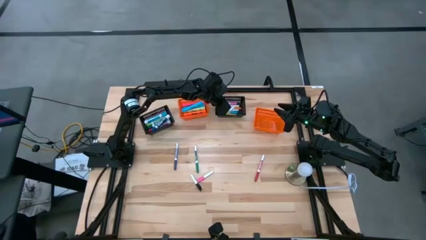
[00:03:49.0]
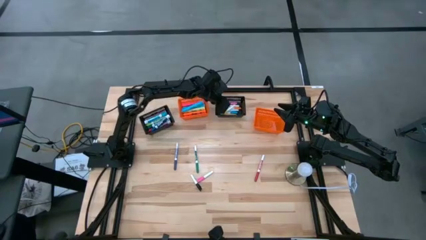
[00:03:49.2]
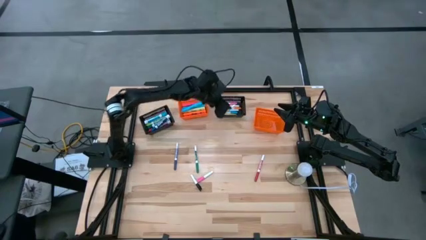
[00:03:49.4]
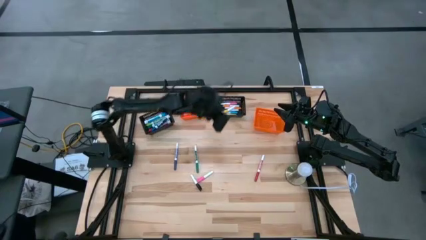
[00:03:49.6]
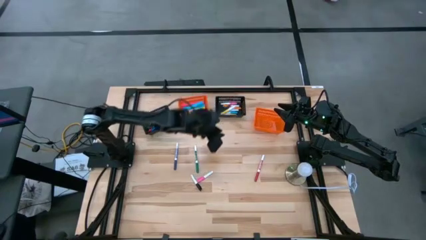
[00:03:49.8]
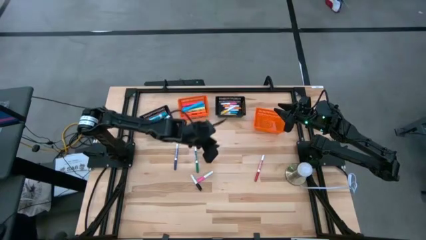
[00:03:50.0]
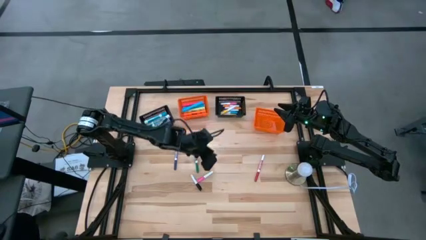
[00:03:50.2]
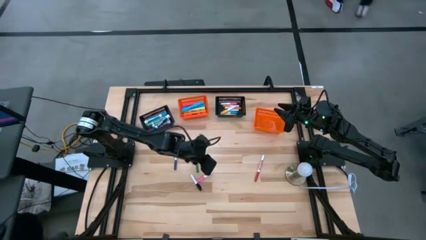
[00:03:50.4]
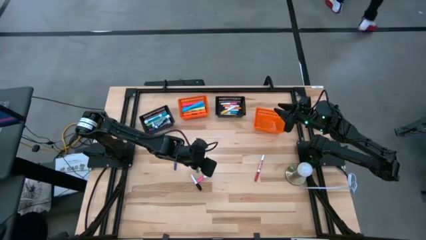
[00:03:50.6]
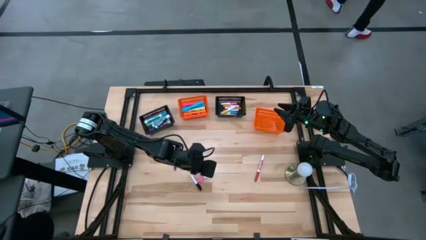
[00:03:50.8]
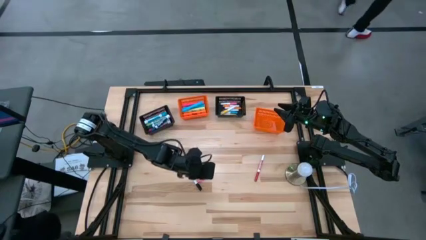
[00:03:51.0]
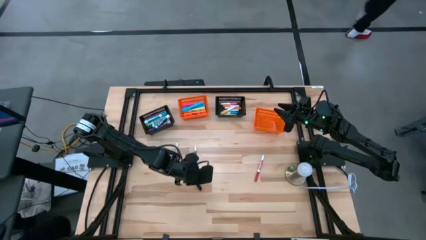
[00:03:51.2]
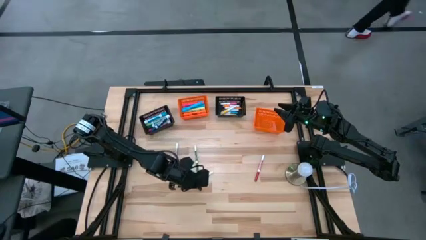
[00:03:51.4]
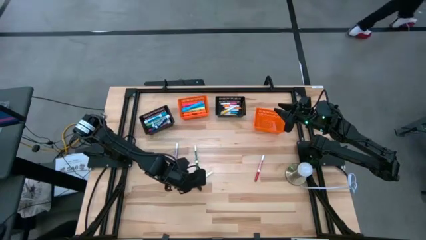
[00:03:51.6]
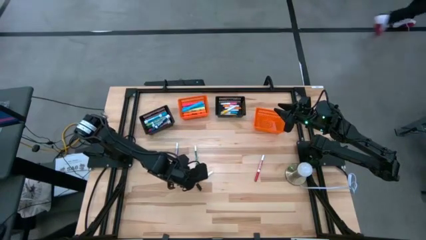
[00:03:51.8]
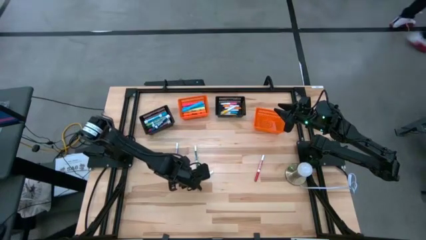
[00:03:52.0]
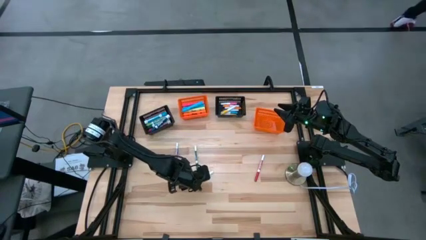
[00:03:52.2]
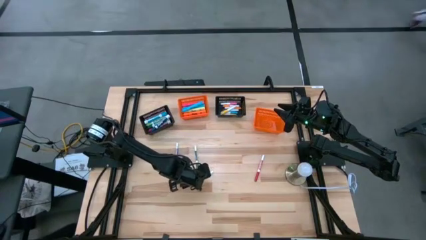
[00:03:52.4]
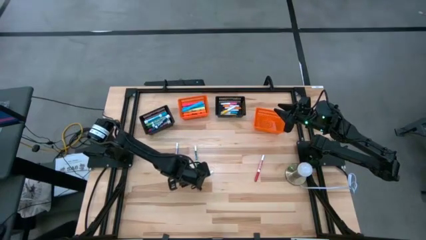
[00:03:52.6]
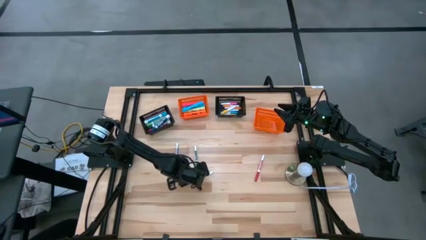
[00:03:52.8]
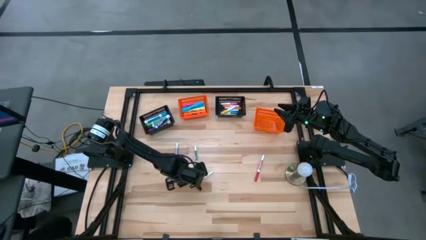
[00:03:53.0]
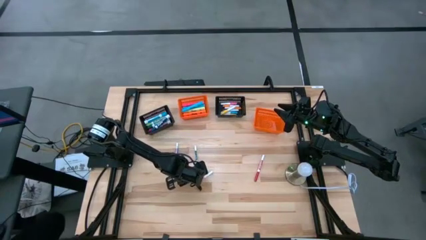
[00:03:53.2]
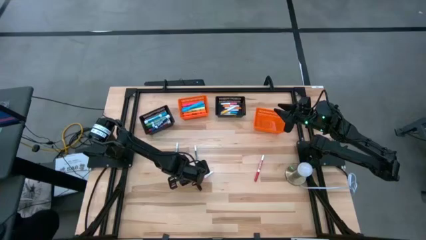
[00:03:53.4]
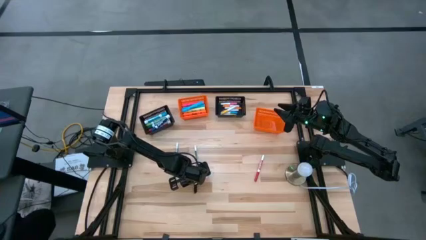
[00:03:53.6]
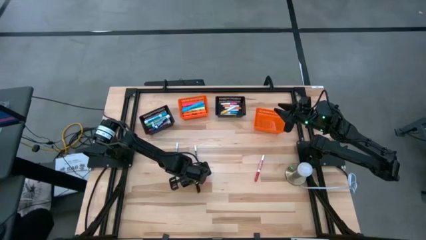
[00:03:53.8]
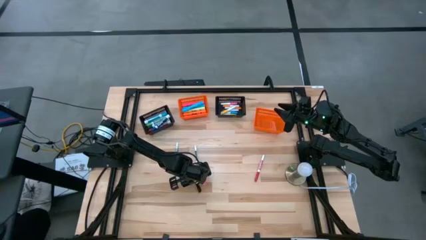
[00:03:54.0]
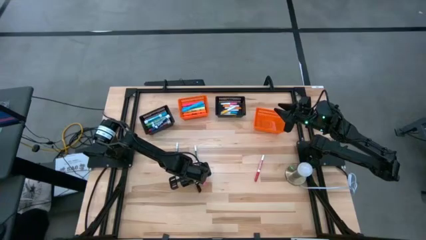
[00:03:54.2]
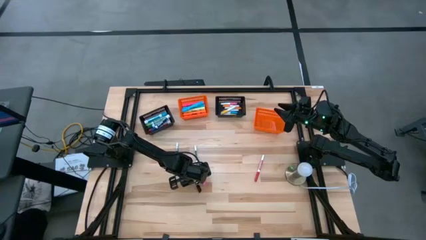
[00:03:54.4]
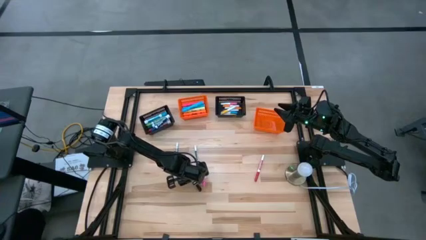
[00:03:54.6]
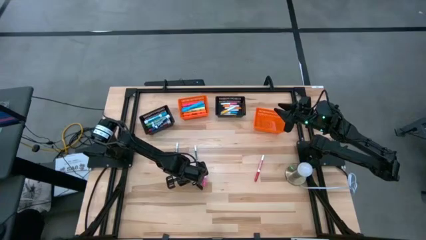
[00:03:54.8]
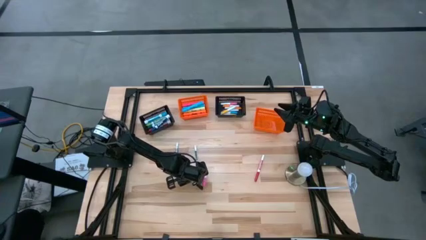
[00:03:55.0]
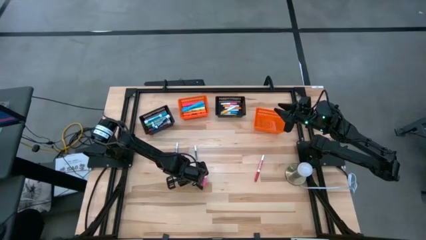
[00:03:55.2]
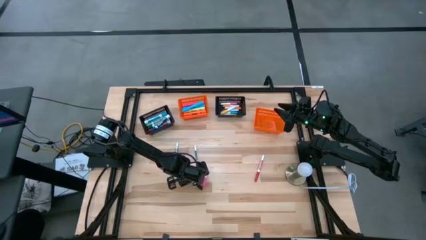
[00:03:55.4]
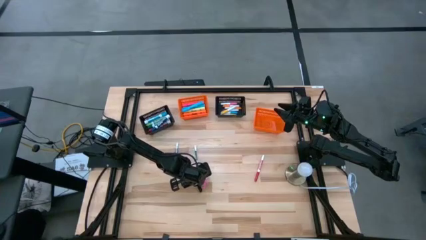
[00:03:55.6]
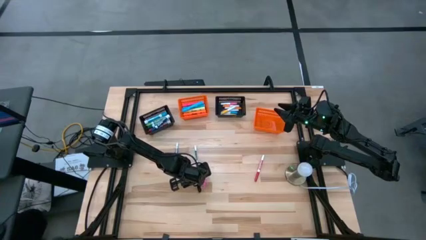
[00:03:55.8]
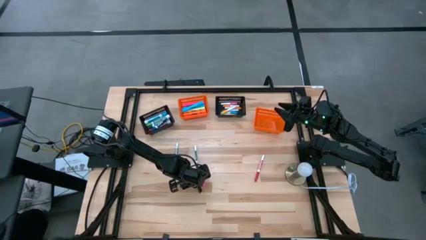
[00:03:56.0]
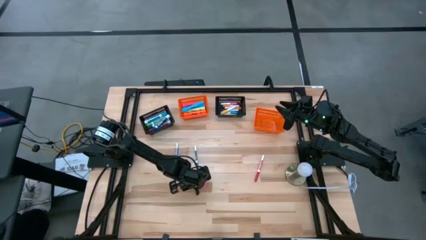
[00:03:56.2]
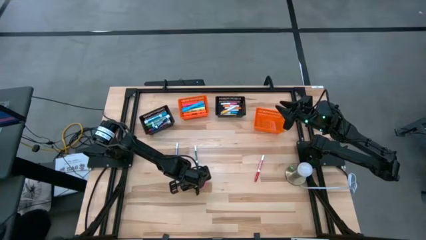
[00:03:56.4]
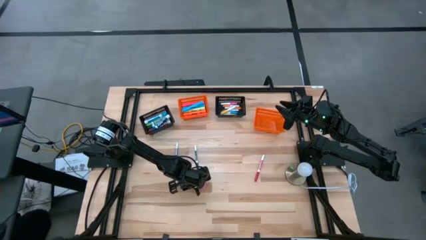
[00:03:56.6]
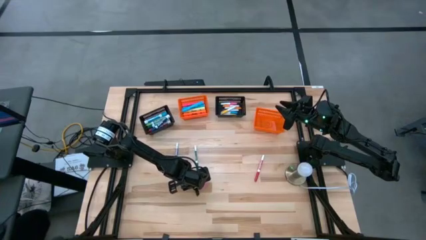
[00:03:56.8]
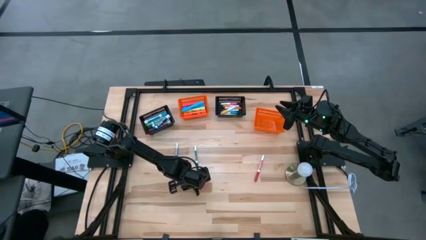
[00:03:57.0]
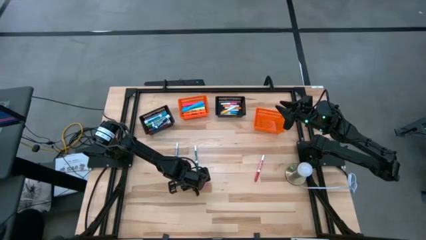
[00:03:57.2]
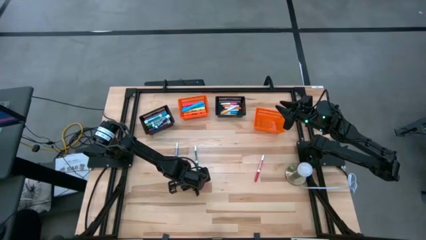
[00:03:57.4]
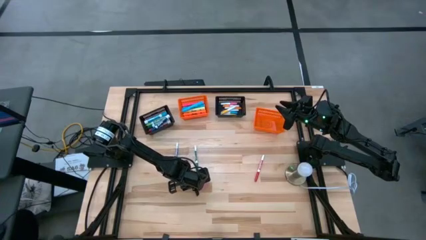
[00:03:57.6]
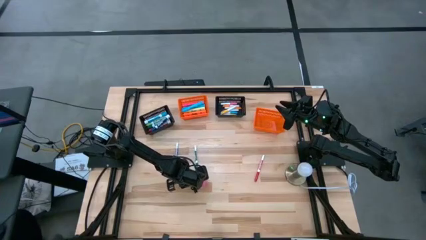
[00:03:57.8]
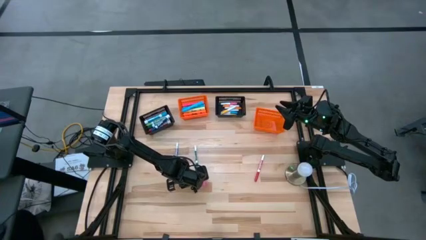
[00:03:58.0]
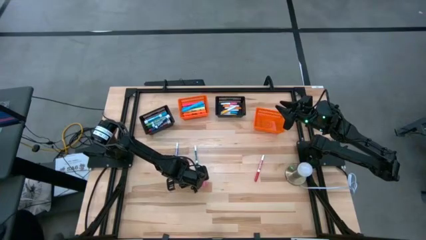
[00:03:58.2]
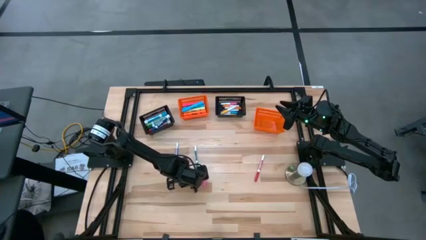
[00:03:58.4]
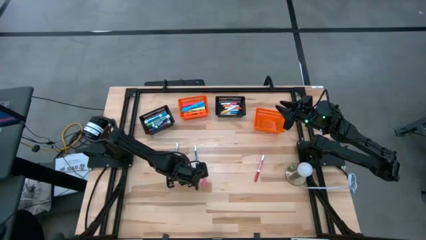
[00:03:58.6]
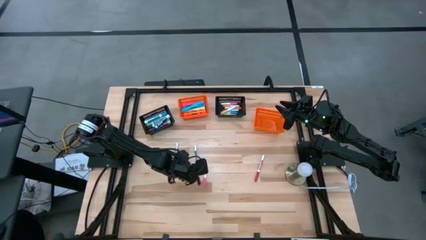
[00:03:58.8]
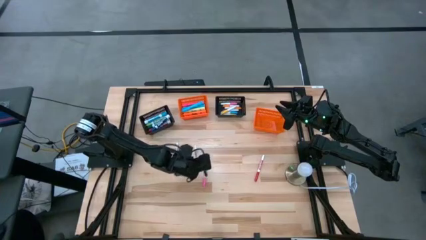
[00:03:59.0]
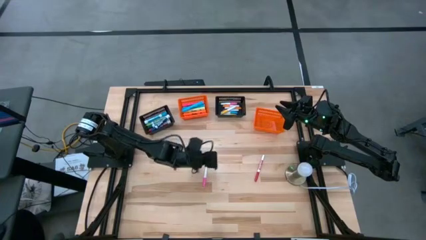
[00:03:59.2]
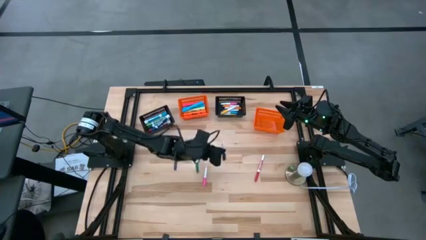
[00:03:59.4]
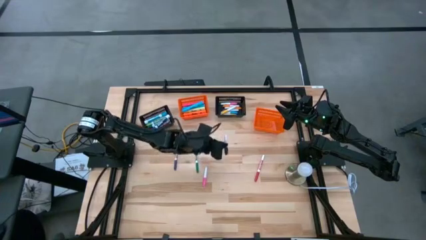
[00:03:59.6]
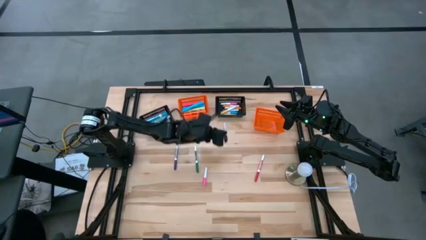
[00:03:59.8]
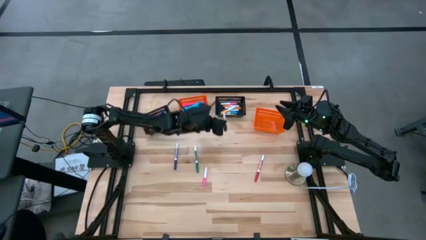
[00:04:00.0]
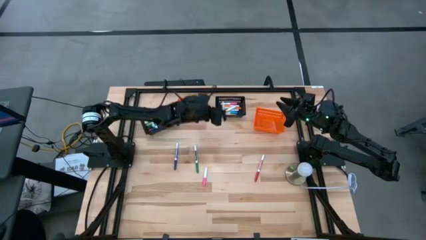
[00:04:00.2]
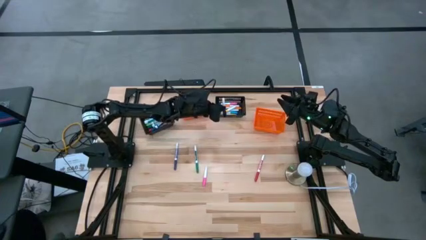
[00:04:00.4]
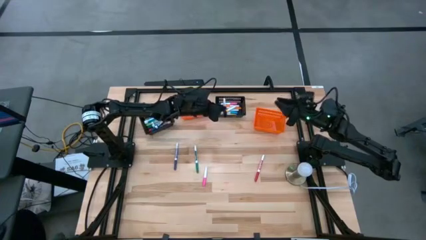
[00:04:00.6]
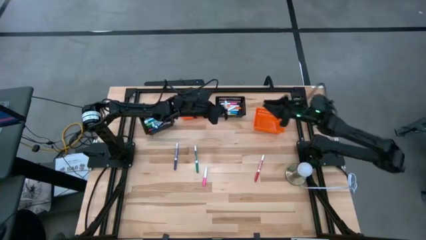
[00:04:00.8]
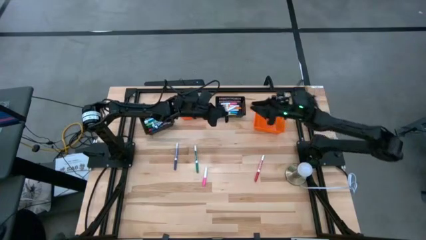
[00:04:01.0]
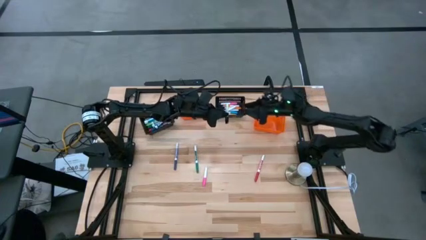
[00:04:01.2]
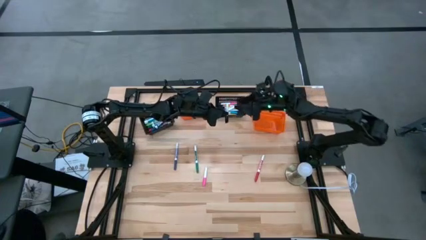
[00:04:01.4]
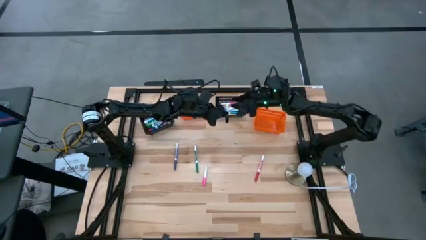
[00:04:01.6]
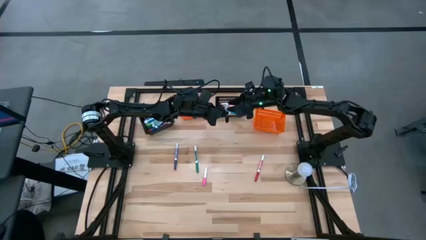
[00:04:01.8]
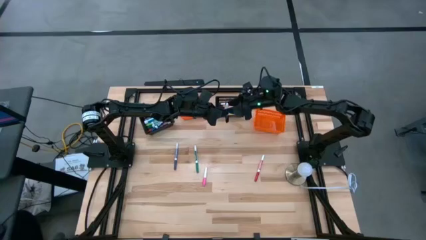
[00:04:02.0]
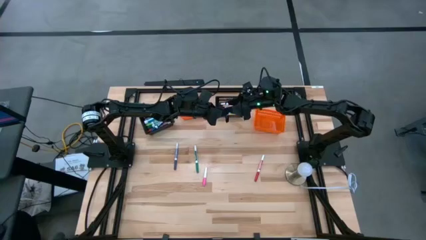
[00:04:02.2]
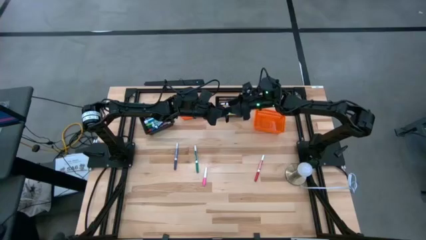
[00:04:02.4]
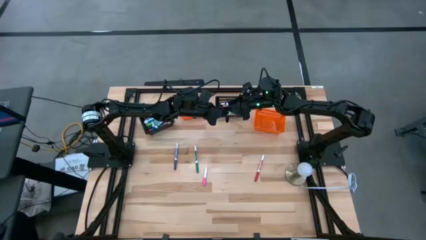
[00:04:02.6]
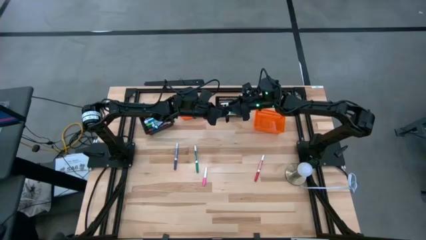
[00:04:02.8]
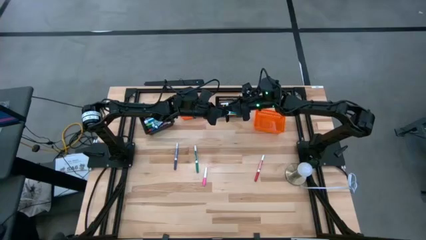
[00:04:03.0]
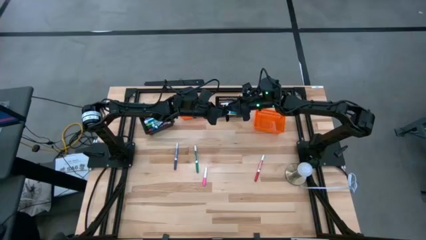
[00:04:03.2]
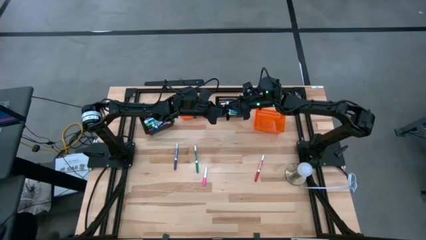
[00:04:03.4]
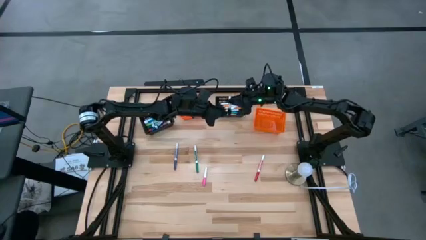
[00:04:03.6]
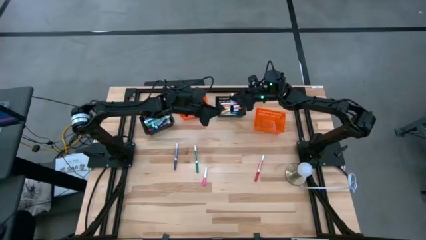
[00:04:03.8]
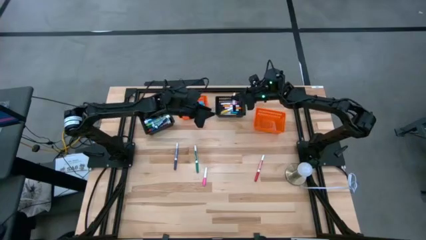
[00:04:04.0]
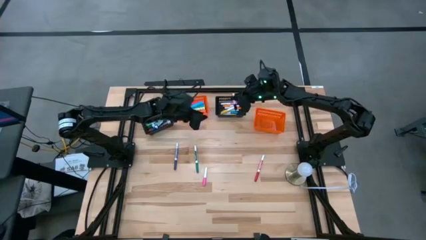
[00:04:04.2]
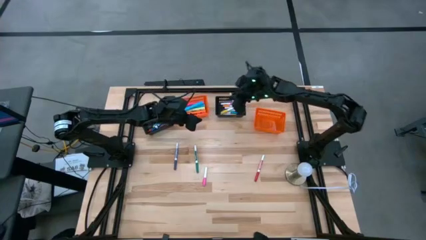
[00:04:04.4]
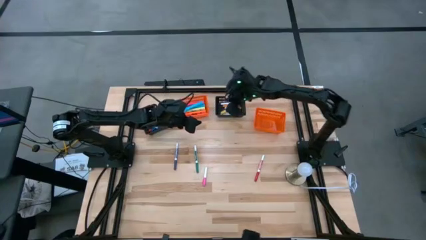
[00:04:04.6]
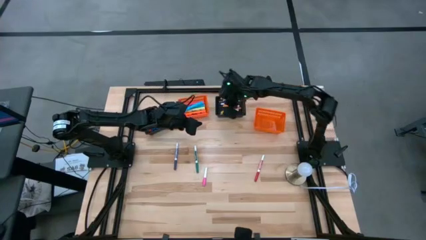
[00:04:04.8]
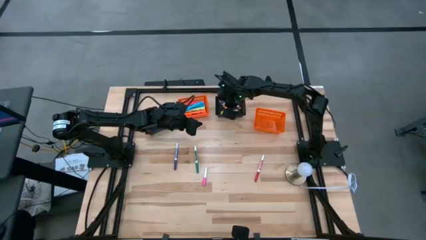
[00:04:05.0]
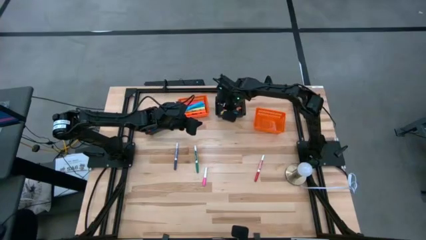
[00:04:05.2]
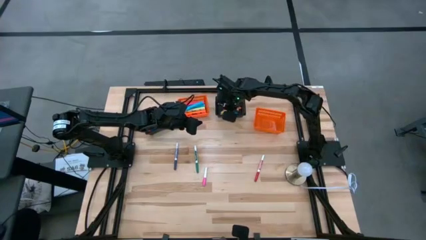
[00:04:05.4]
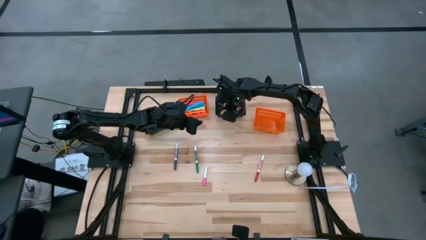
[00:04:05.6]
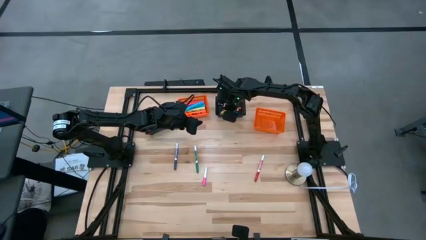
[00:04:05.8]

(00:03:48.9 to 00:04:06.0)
Task: Pick & Place Markers
Put the small black highlighter pen into the right black bin
